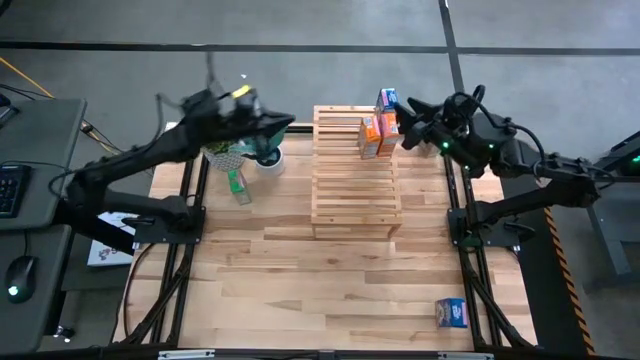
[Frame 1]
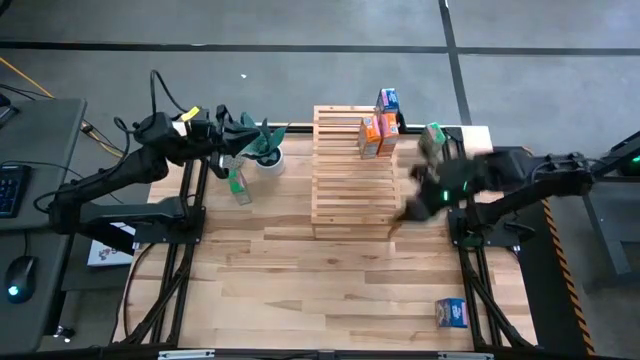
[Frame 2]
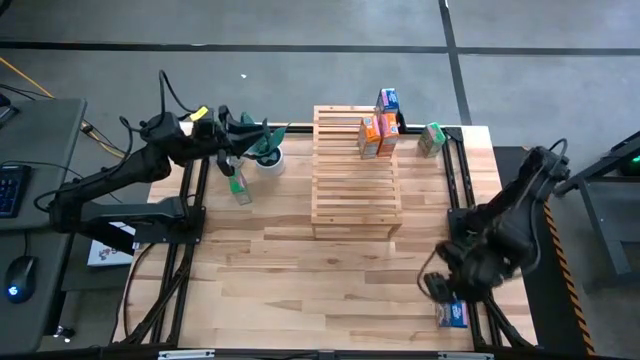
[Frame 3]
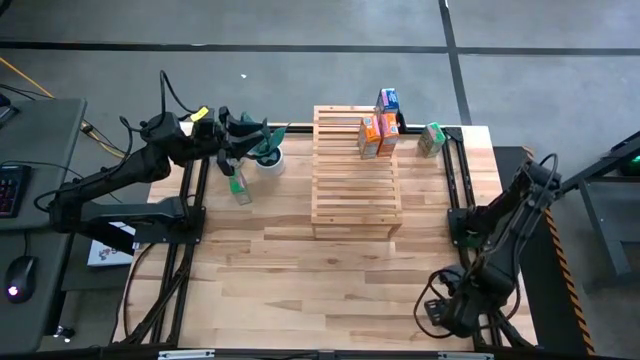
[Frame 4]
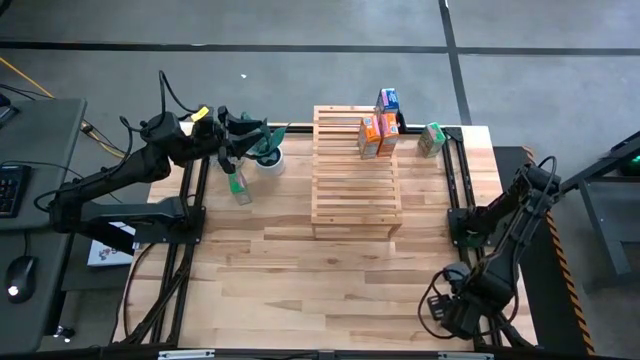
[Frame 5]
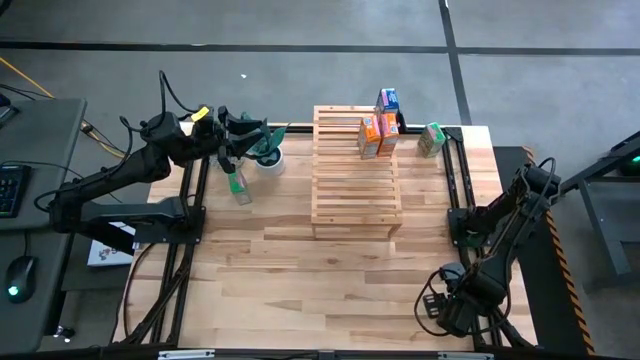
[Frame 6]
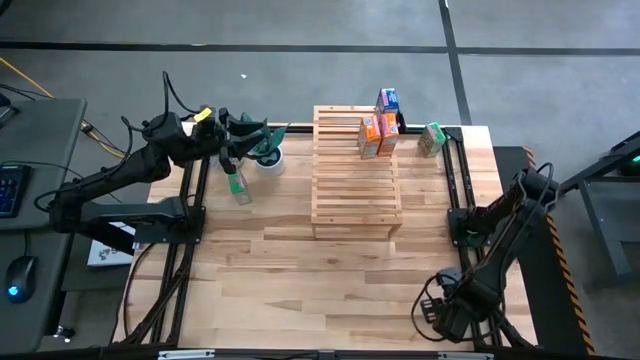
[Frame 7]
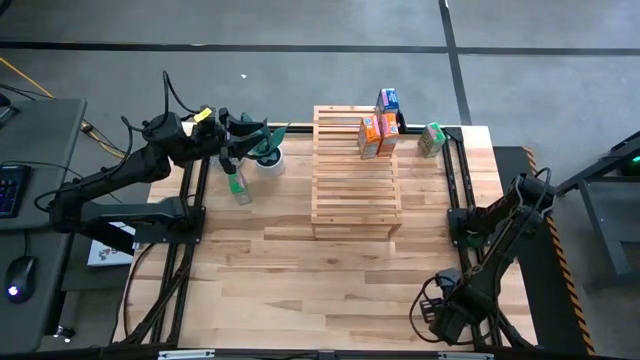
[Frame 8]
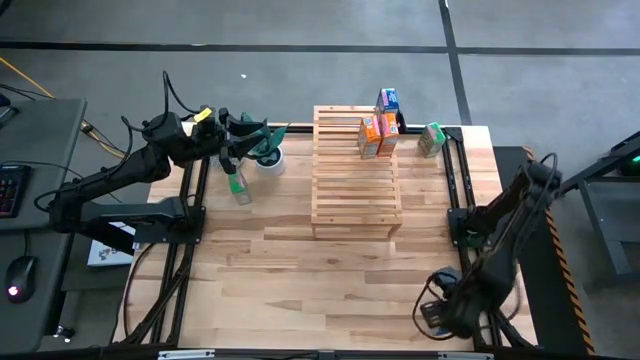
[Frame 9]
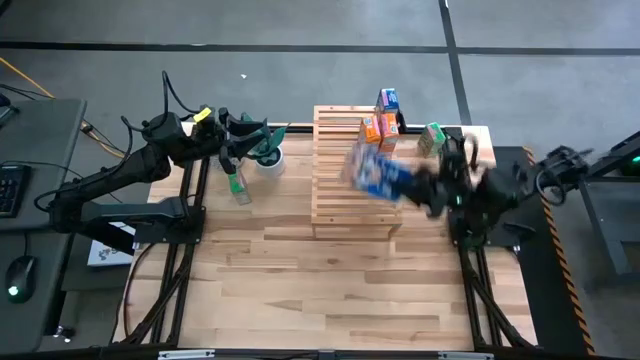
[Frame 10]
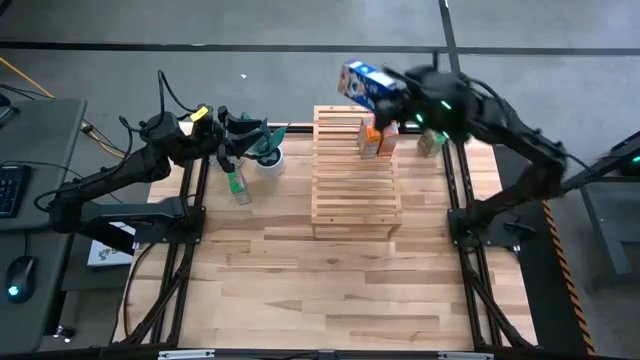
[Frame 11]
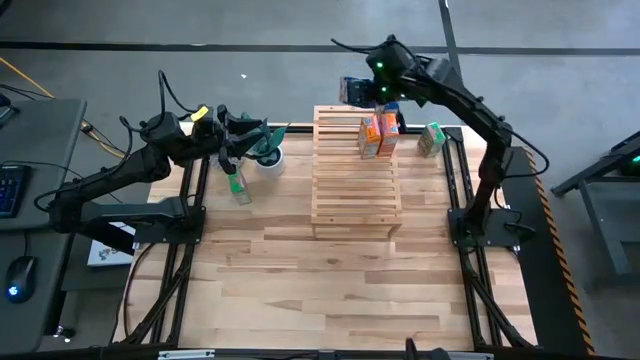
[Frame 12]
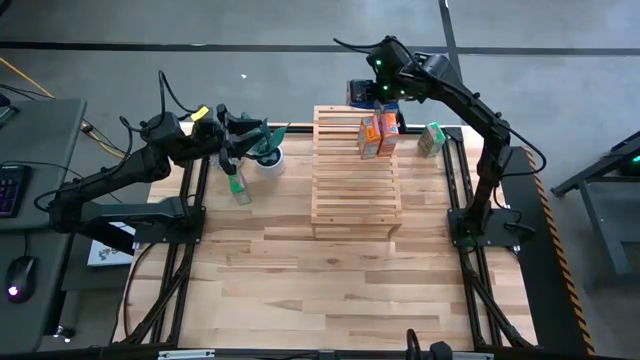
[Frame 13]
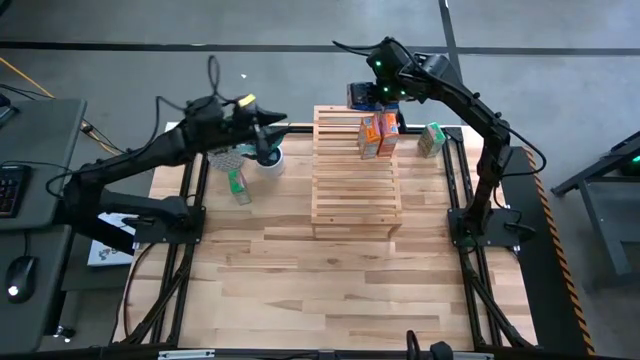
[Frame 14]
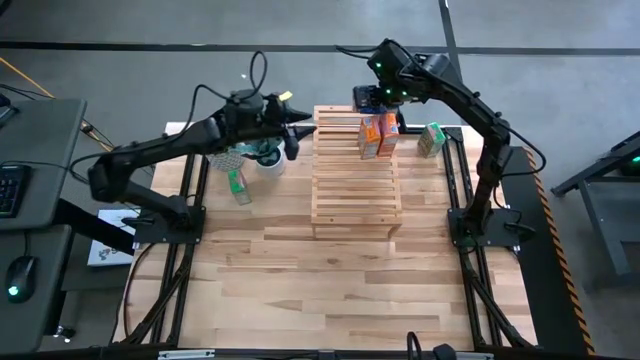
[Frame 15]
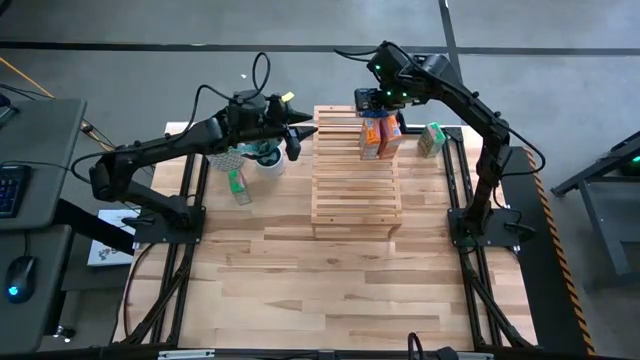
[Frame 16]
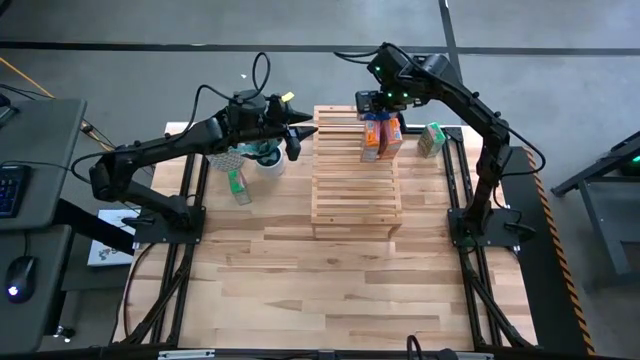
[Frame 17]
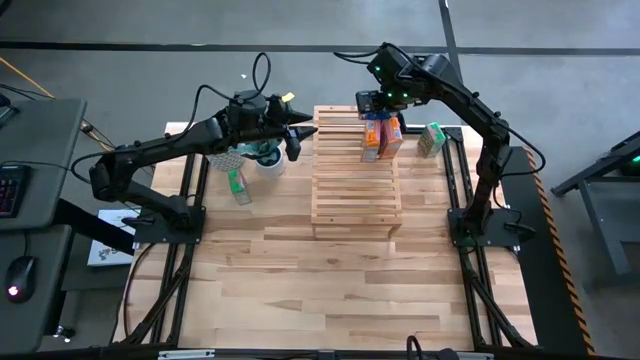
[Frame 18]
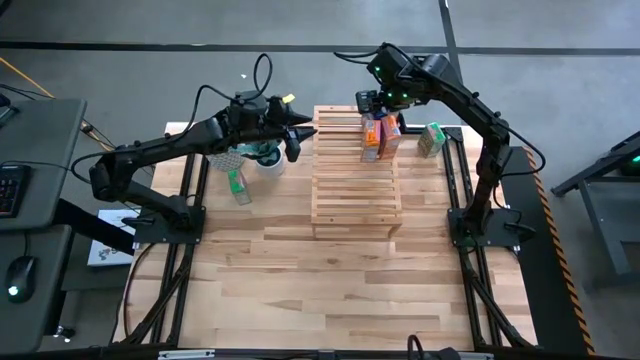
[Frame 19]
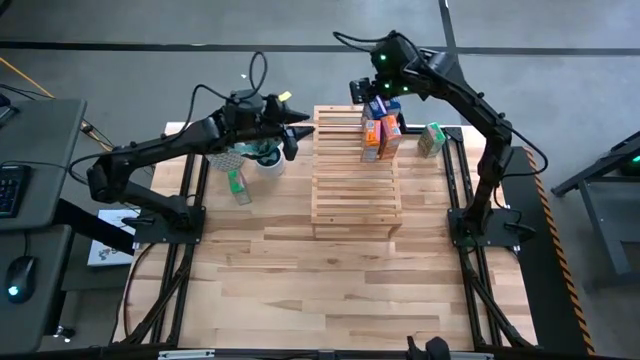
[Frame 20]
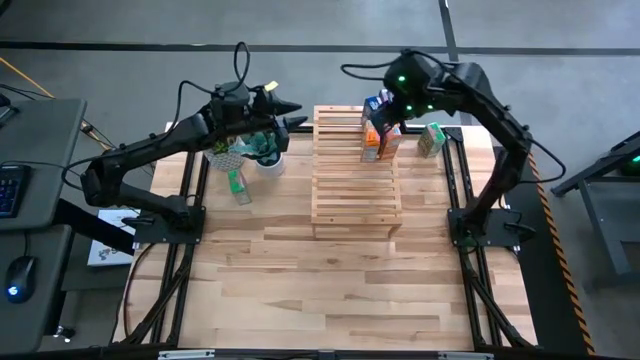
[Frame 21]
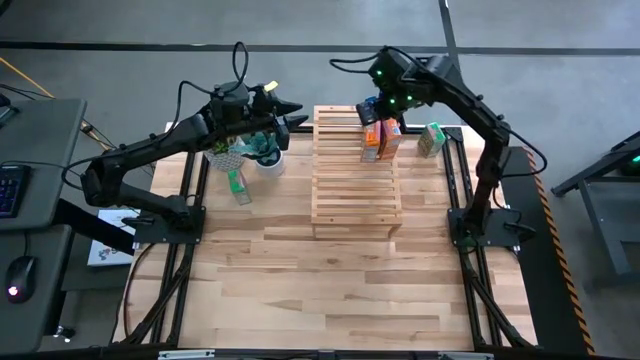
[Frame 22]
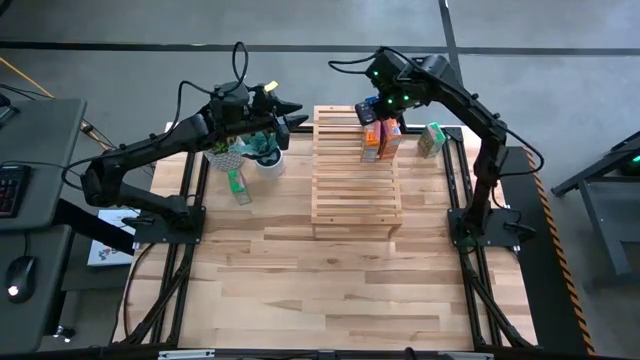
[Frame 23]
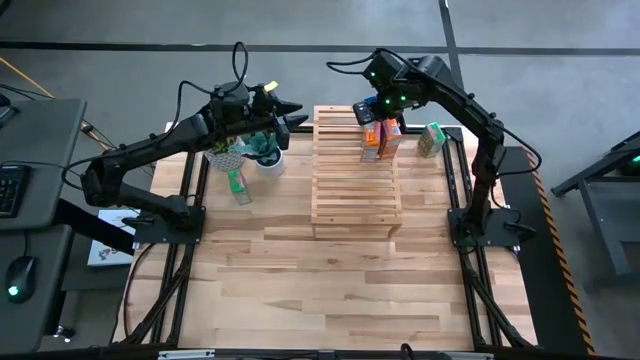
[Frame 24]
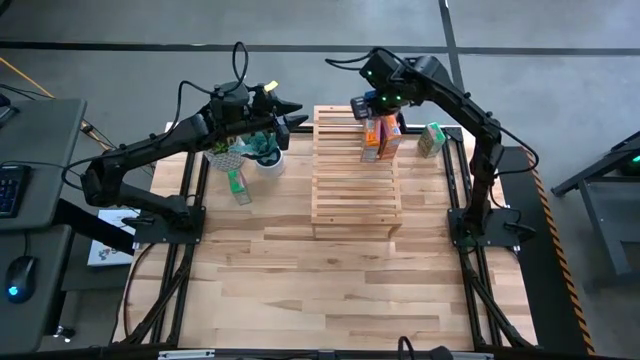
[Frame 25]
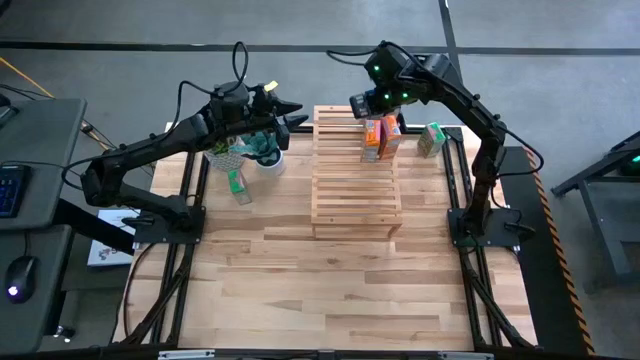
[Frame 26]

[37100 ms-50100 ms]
Task: Stack cereal on shelf
Put the blue cereal aligned with the other blue cereal box on the shelf

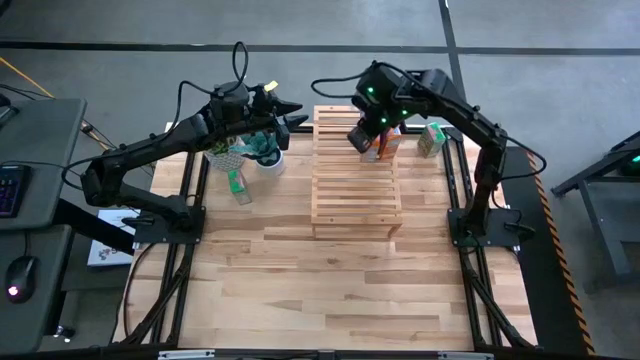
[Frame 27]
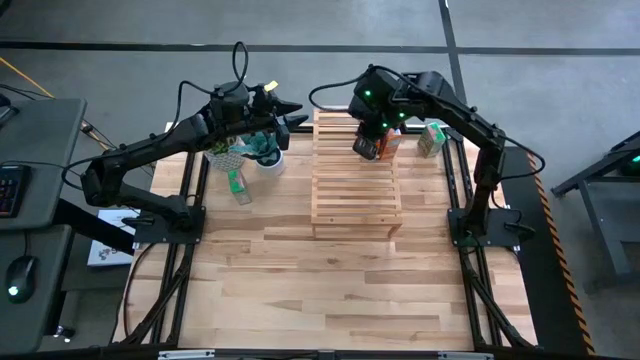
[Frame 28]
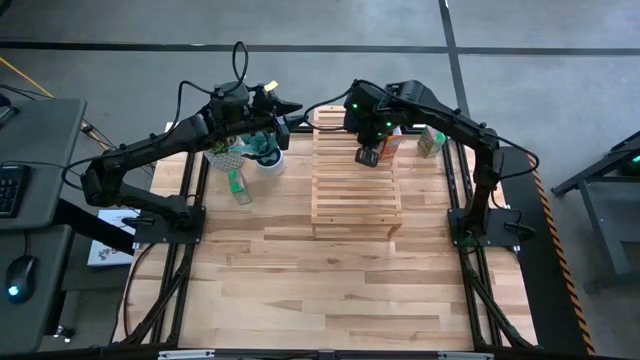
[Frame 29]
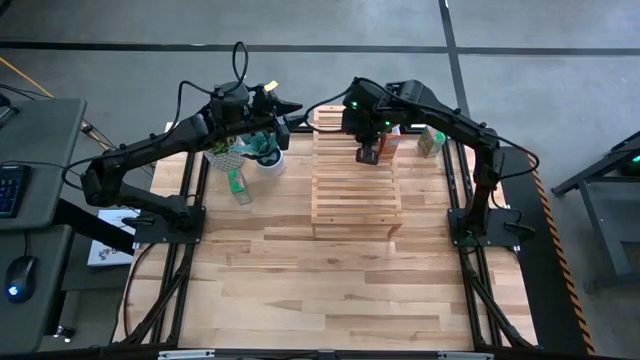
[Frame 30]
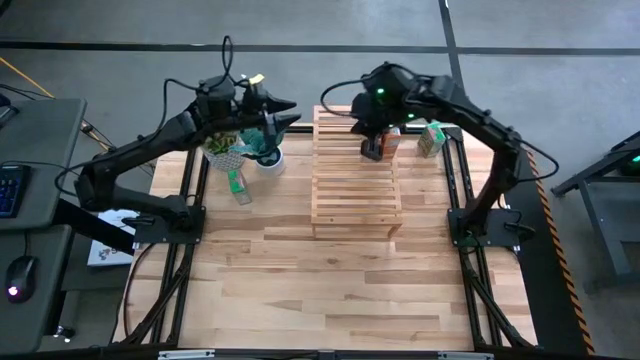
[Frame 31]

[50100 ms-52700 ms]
Adjust the orange cereal box on the shelf

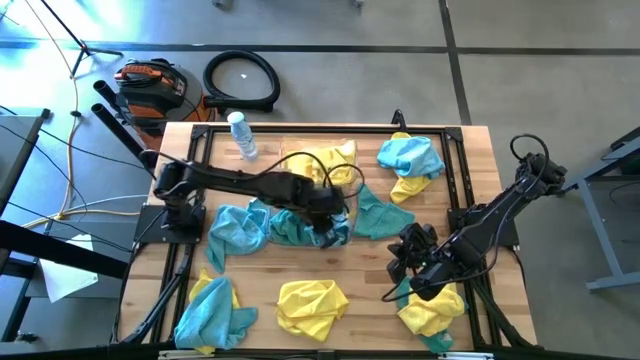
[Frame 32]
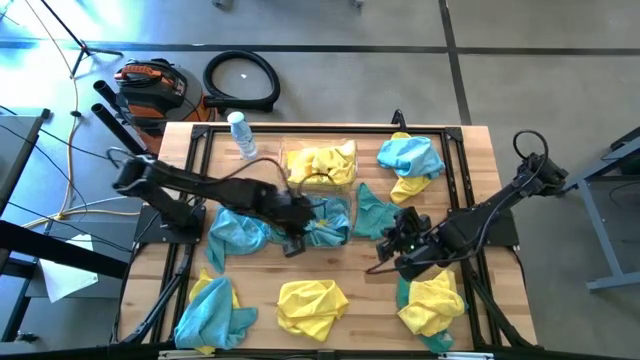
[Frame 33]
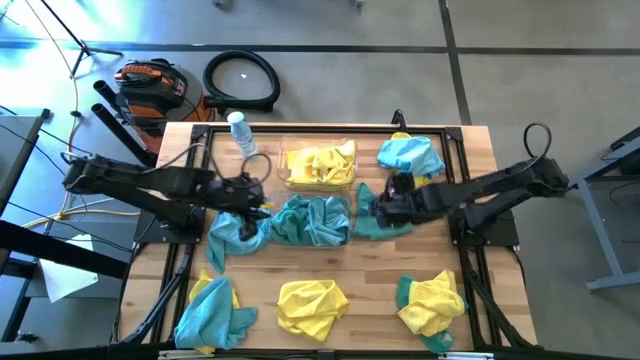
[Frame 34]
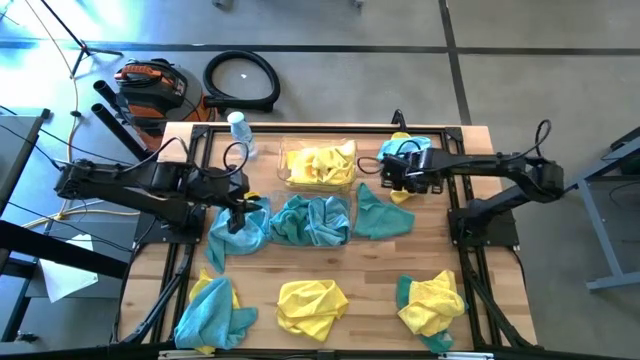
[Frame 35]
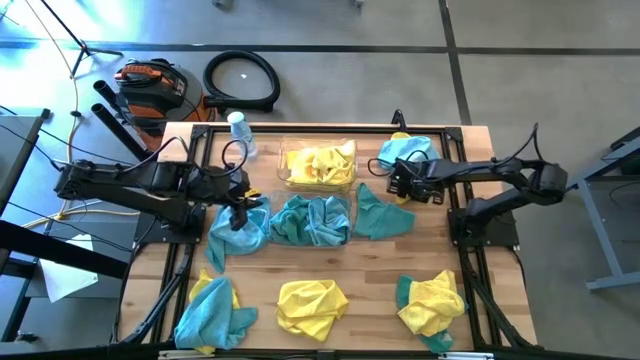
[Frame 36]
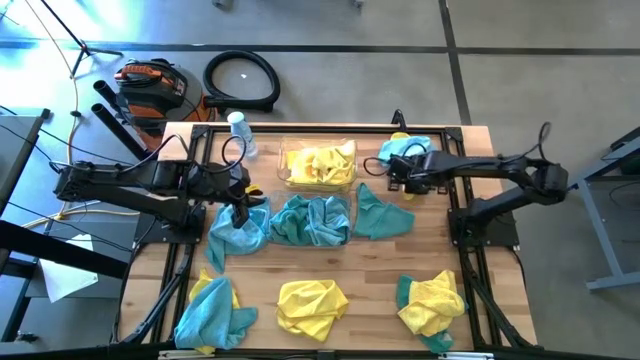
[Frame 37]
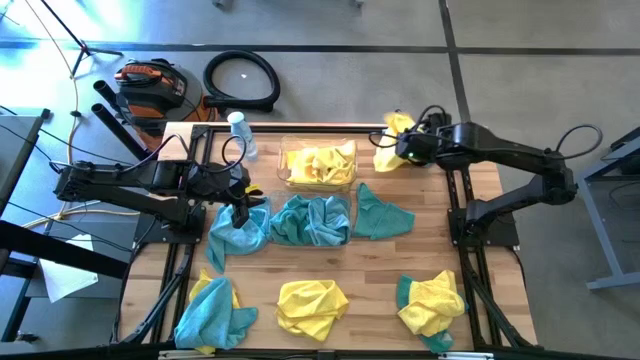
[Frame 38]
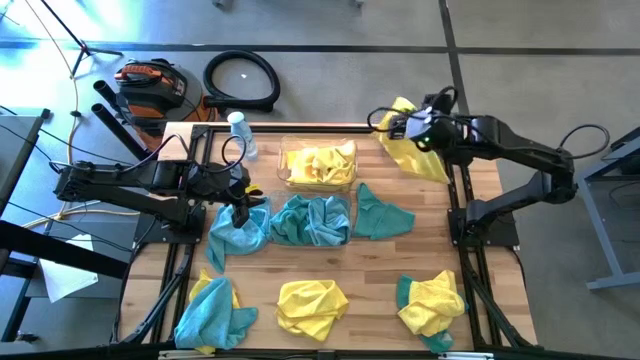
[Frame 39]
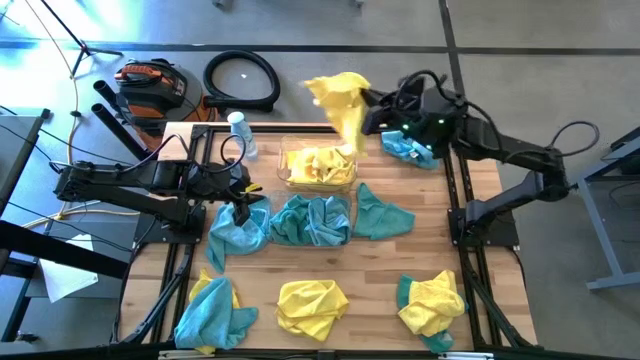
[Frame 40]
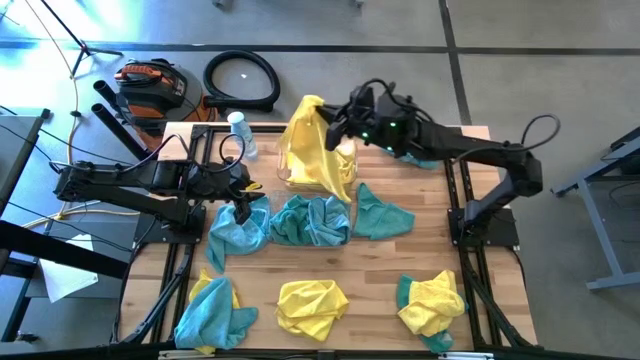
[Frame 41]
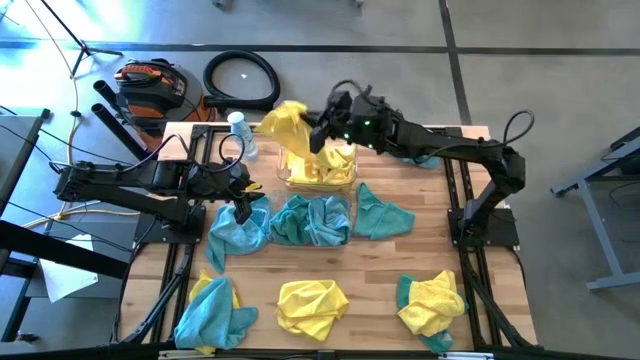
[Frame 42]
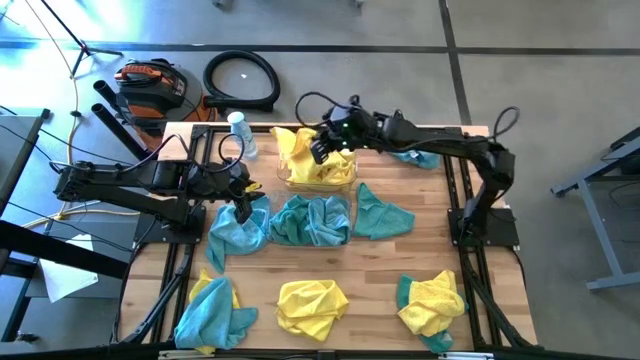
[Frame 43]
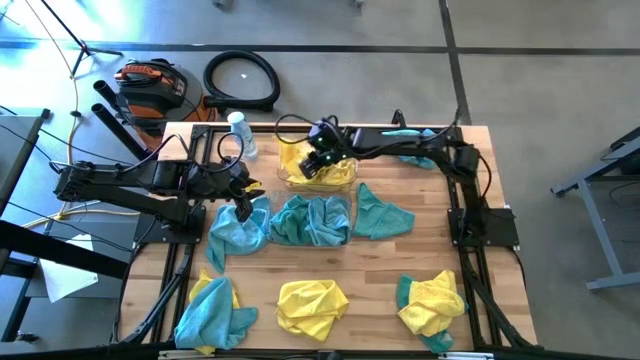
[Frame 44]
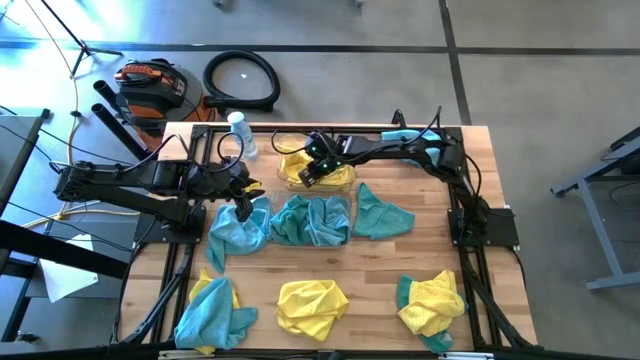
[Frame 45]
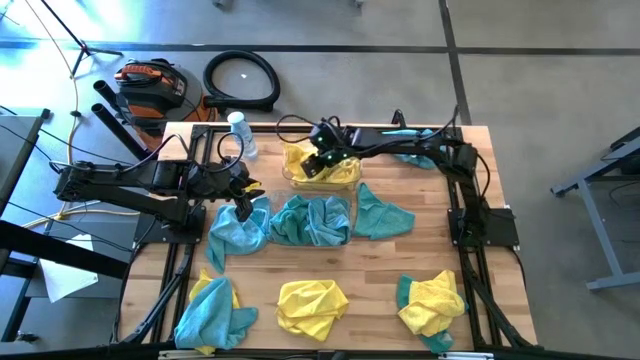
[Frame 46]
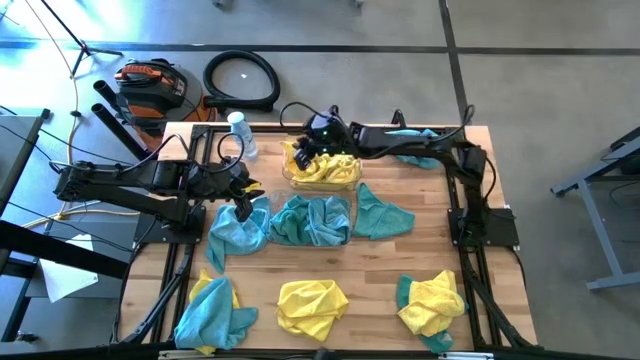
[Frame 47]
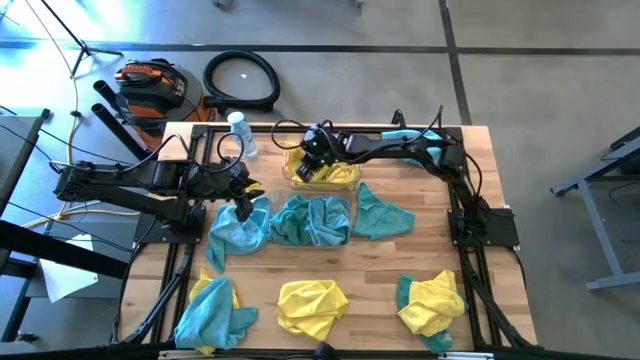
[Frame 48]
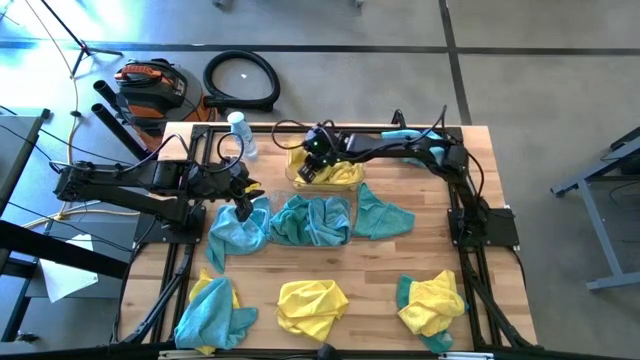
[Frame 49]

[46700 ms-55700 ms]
Task: Sort microfiber towel by color & place in baskets
Put the yellow microfiber cloth into the top transparent bin
